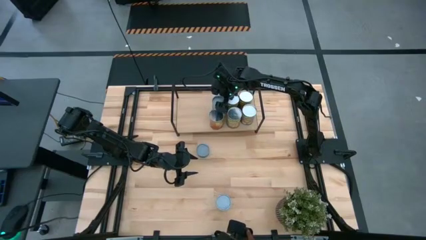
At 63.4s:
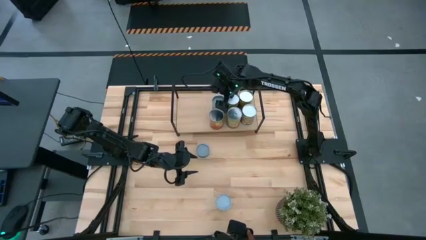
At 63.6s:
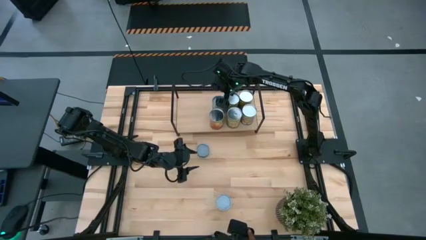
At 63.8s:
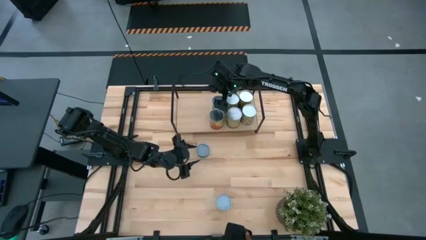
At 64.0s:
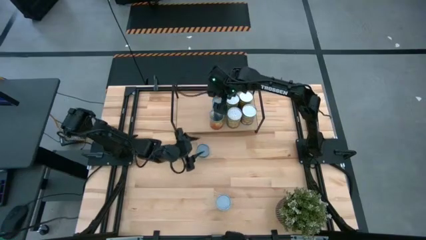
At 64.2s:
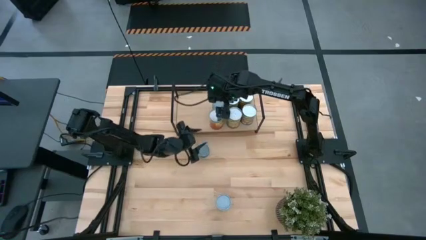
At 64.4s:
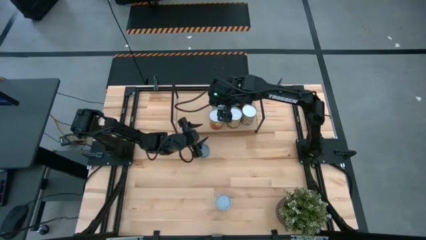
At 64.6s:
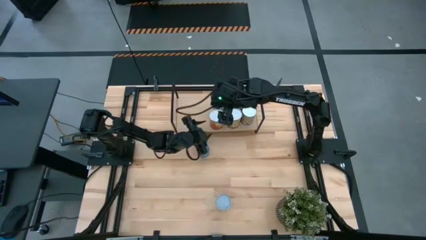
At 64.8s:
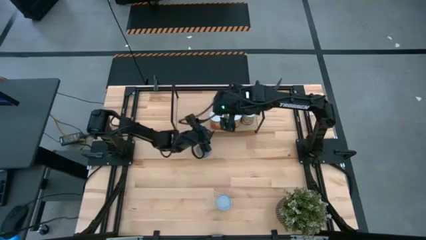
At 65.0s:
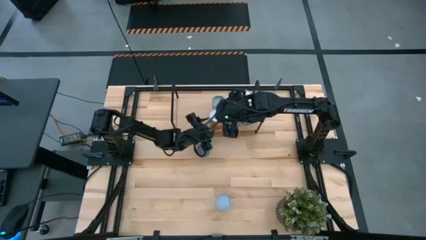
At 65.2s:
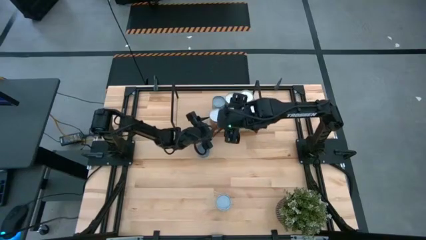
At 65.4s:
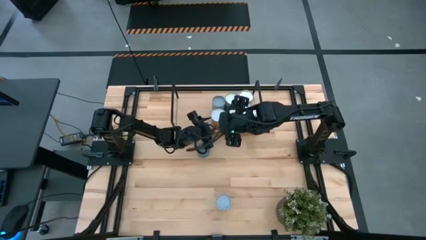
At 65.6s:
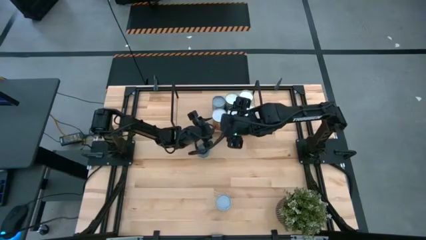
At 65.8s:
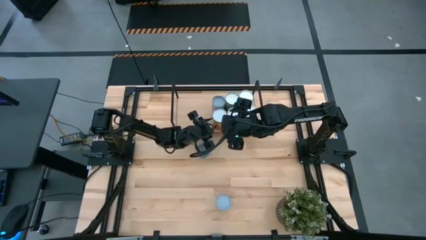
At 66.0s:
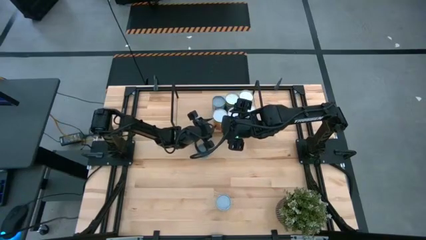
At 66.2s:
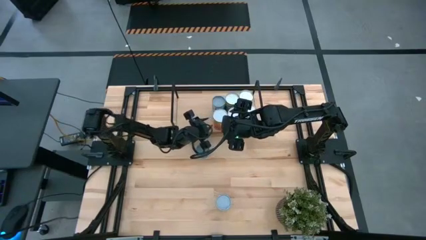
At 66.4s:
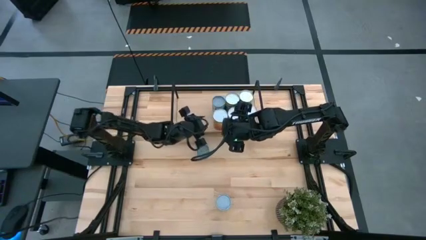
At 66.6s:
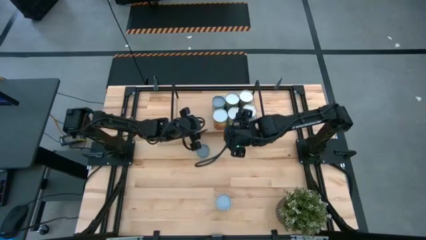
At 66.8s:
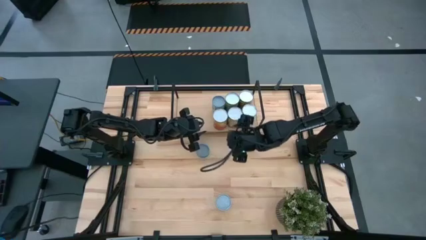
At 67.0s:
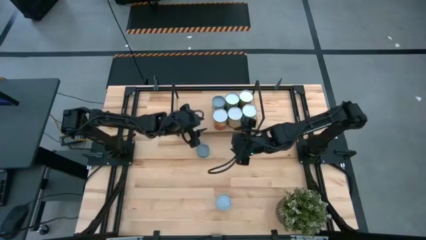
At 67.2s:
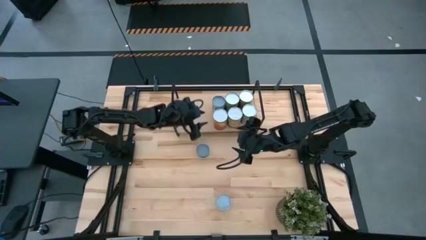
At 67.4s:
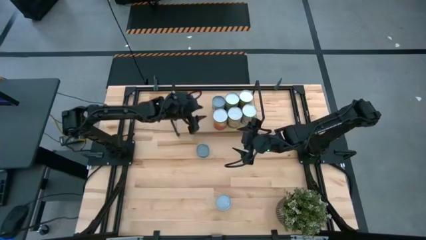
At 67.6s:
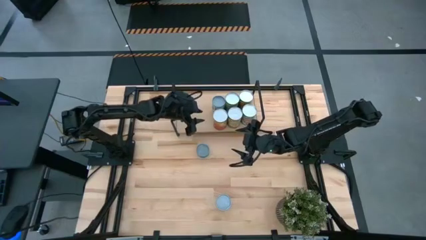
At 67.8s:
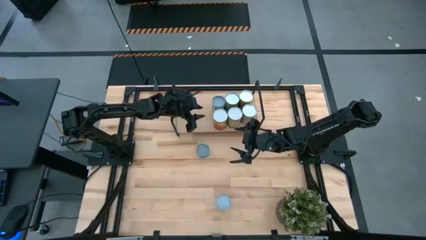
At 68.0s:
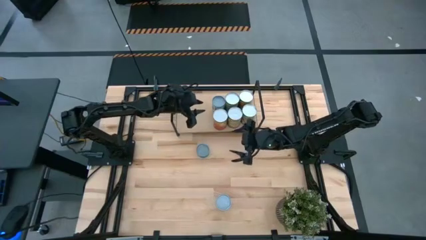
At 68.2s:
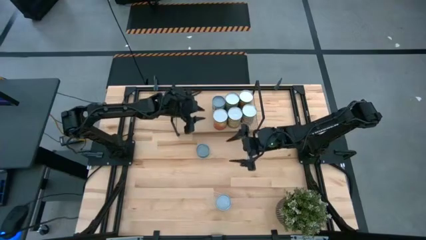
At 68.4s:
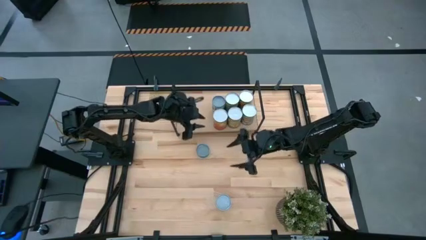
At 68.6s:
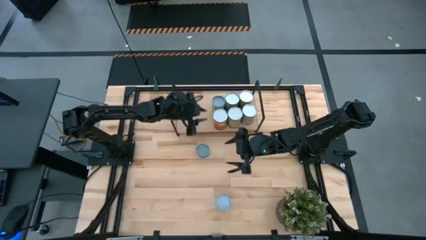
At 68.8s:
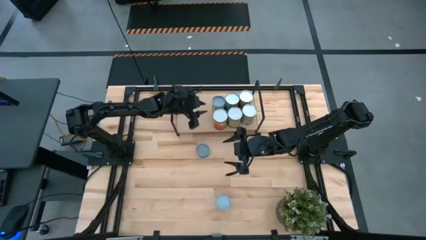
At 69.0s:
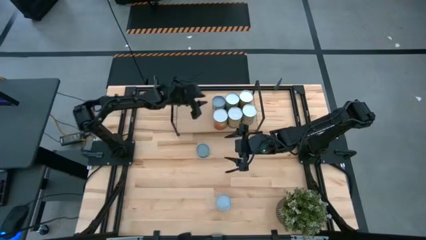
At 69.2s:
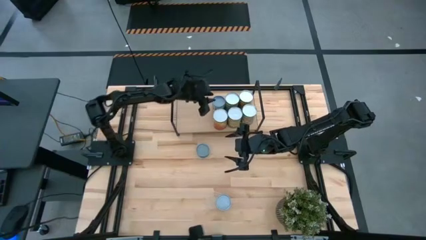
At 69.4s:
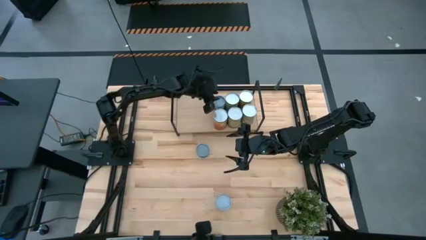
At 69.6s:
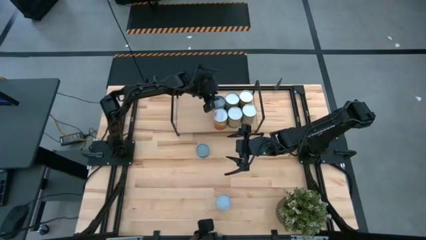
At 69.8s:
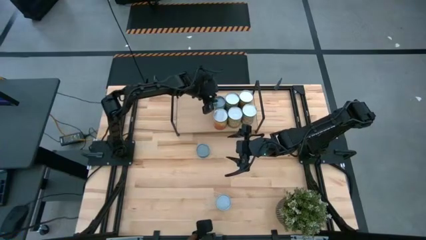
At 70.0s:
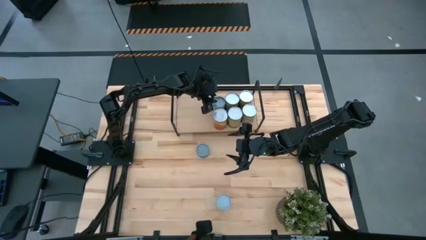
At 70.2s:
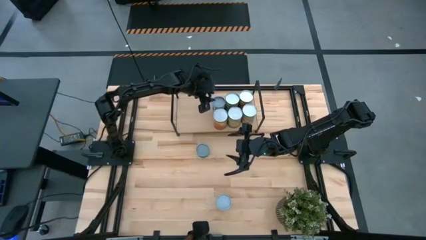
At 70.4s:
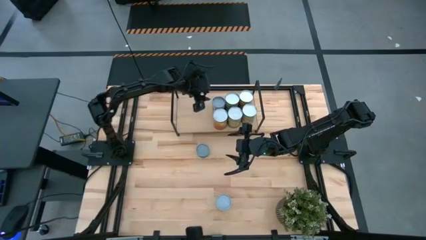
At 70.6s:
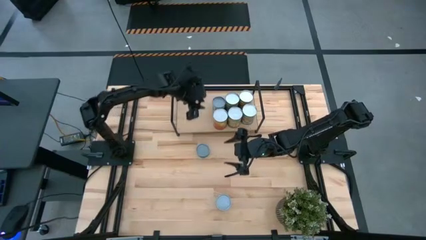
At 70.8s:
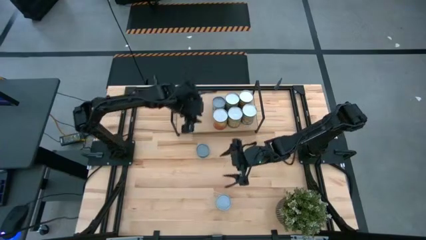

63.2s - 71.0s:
Task: Pick and place cans onto a shelf
Adjust the corn canned foods

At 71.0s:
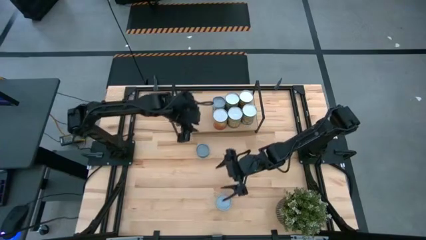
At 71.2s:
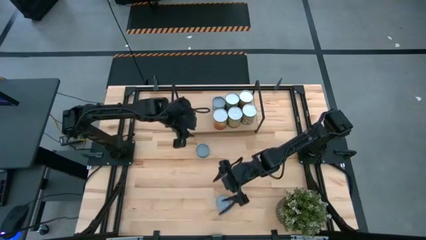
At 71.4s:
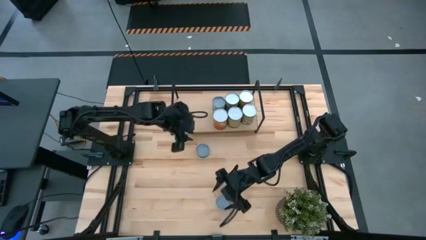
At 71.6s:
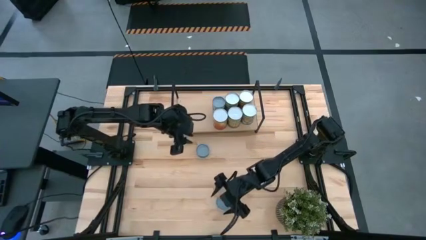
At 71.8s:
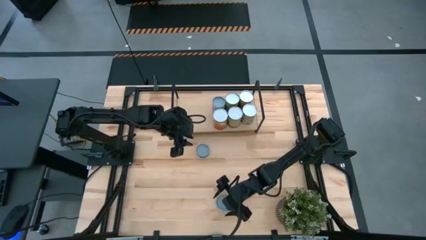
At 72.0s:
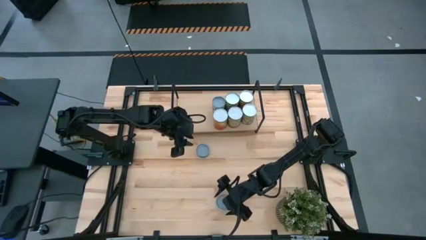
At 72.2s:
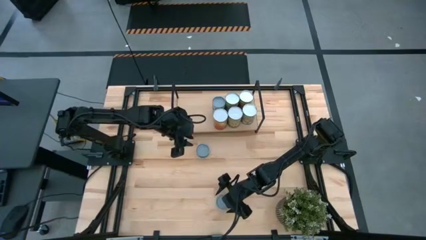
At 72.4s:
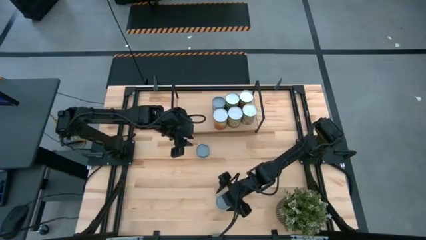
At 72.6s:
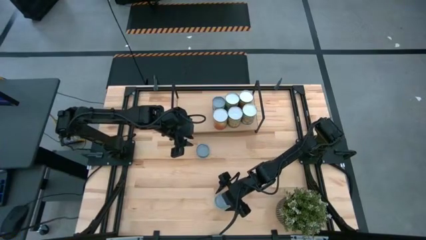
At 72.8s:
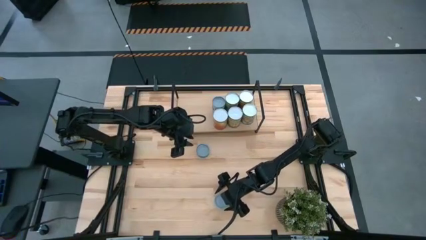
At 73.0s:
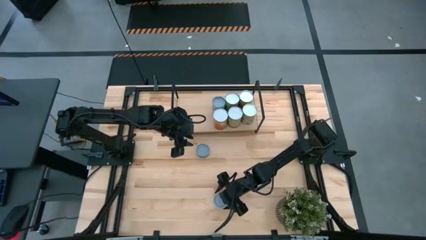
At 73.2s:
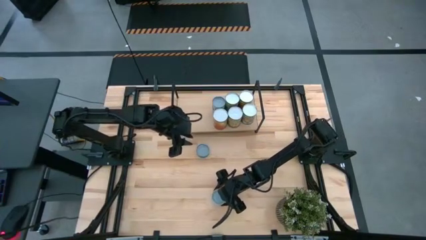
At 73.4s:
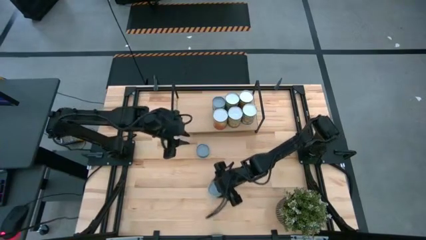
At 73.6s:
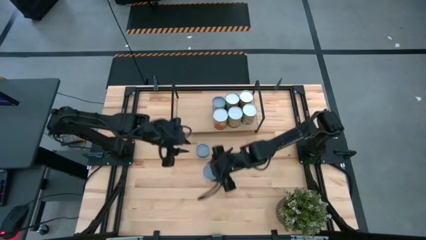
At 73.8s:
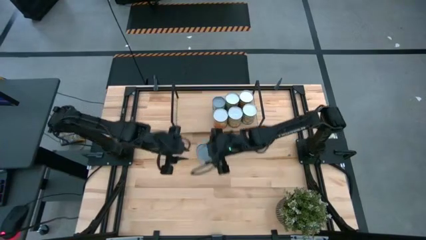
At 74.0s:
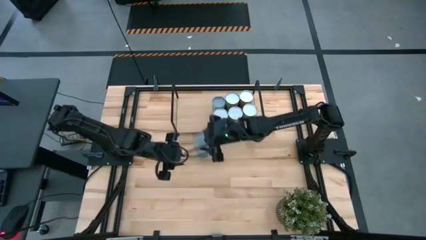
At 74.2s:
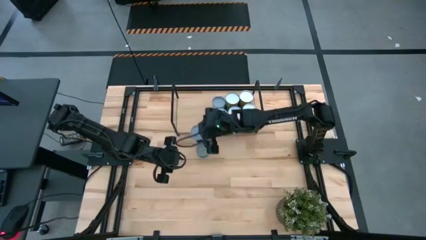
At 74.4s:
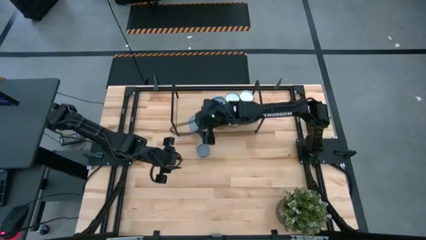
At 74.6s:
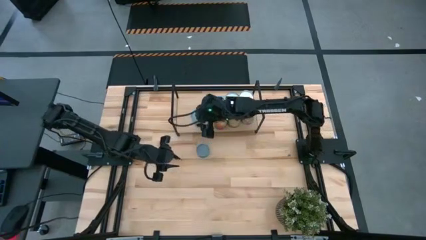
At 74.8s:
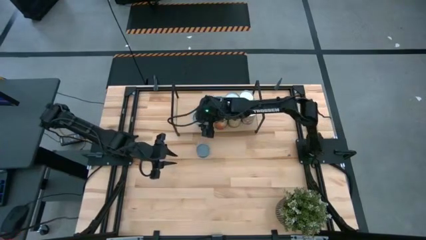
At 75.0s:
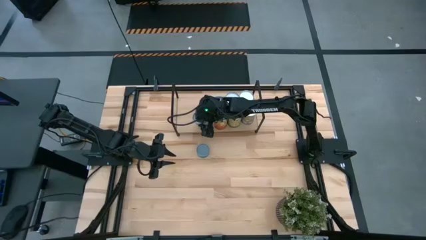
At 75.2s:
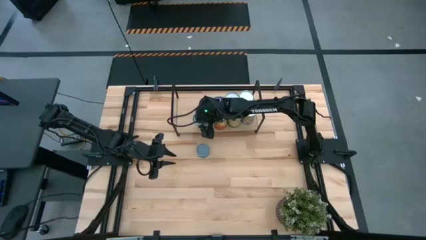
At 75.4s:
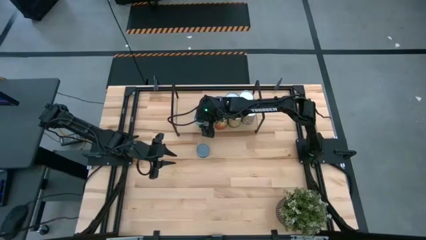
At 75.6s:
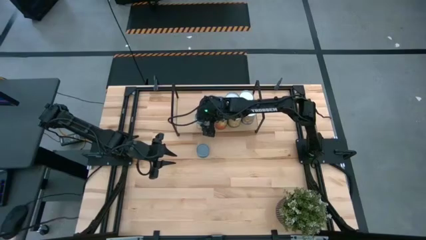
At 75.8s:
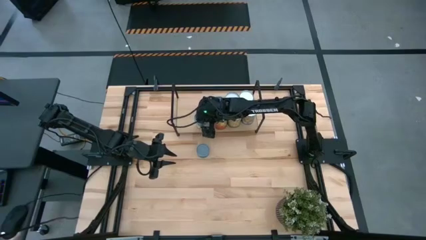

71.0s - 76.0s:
Put the canned chicken soup on the shelf

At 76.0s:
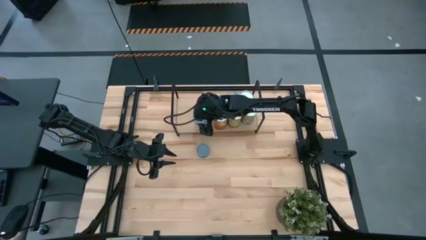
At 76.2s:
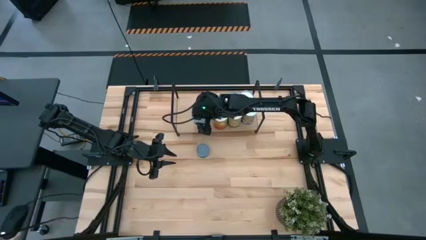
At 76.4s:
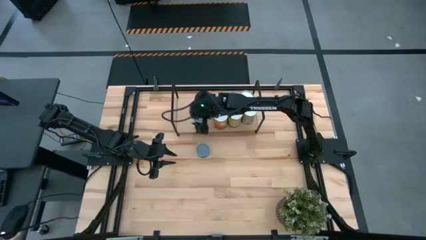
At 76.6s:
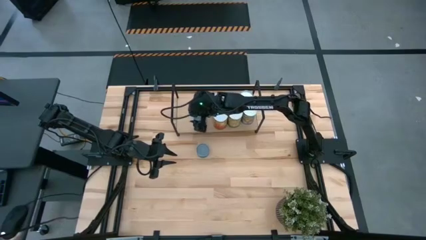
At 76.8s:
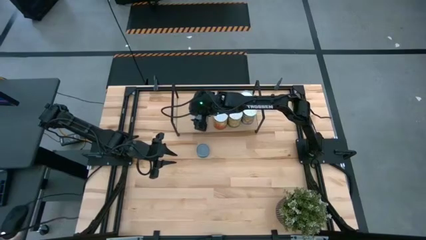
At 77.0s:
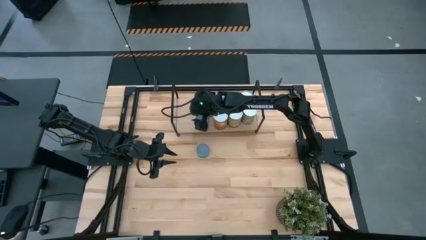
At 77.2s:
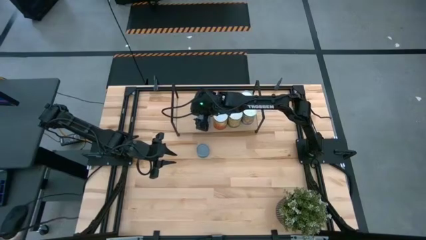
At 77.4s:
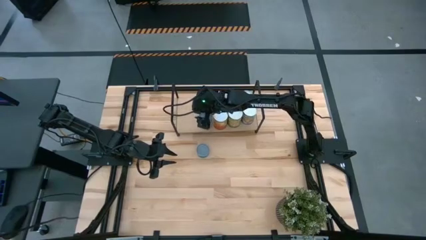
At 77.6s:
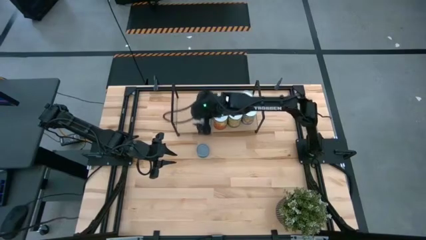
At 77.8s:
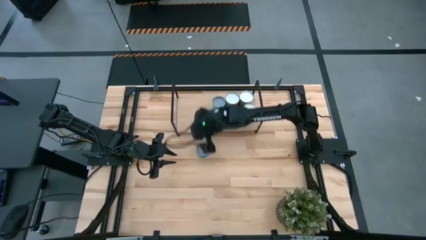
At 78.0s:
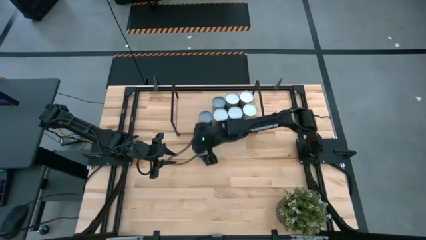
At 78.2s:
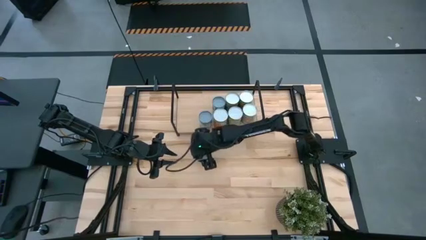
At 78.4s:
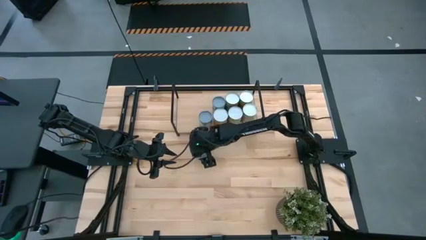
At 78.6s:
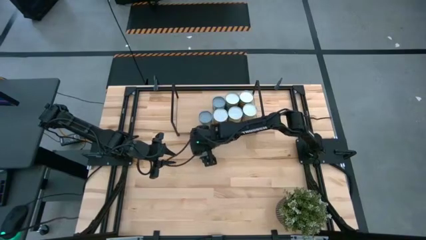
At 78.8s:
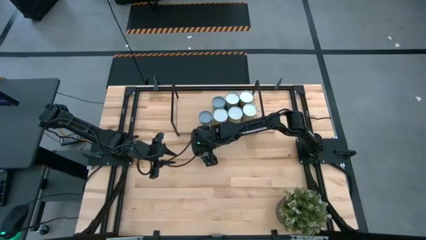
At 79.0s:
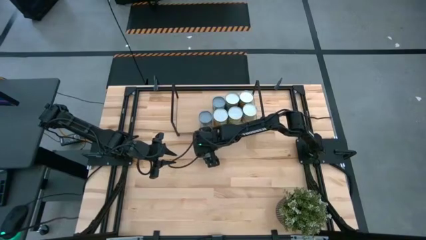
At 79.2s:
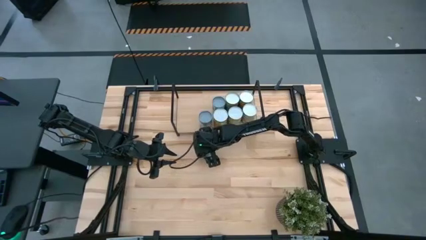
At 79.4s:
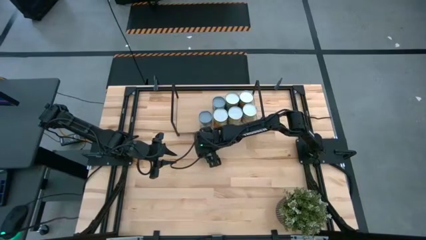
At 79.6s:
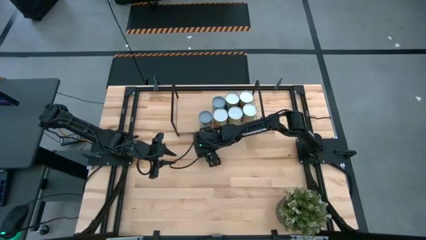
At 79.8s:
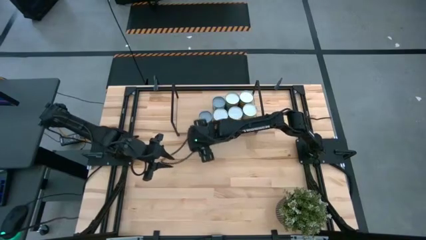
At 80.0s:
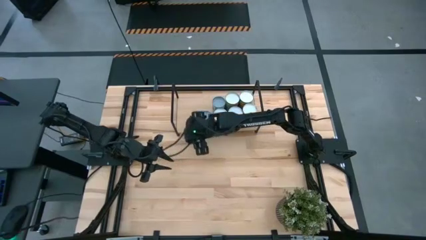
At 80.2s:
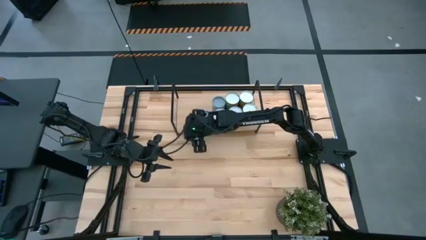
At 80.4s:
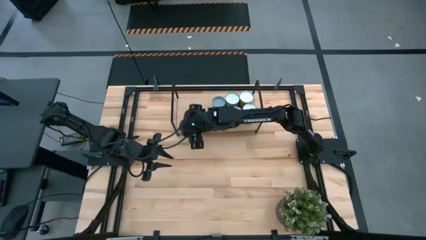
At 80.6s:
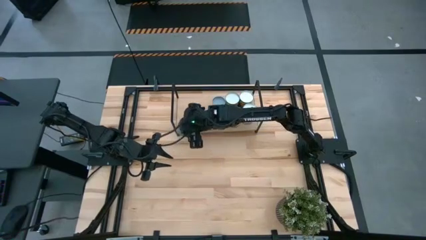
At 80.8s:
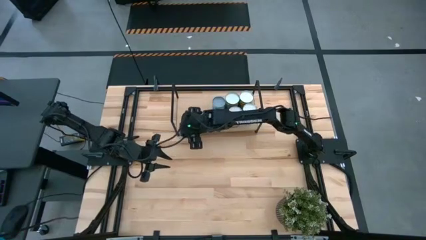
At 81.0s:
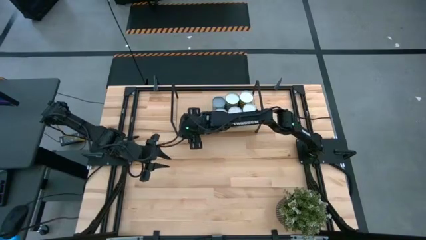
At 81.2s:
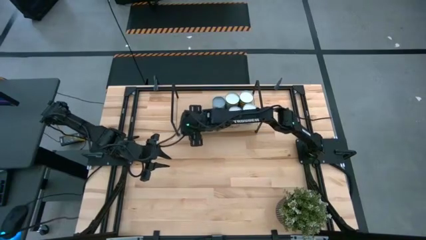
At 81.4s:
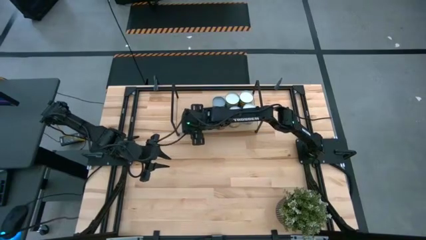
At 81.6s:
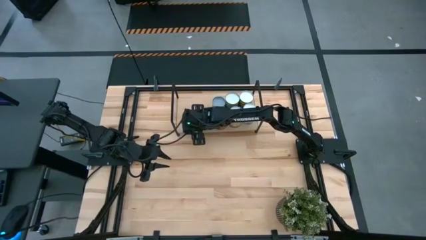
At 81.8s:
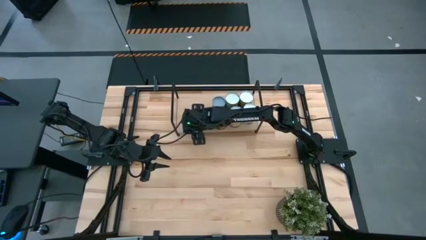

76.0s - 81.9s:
Put the green tuna can on the shelf
